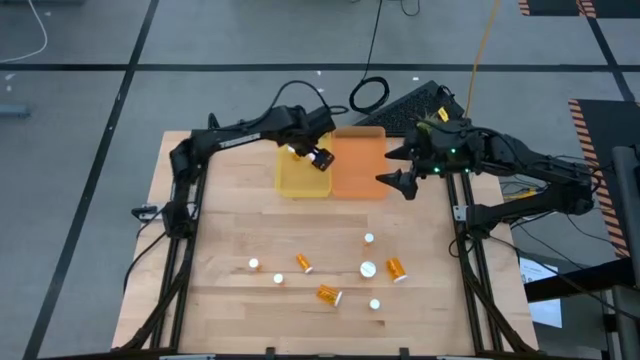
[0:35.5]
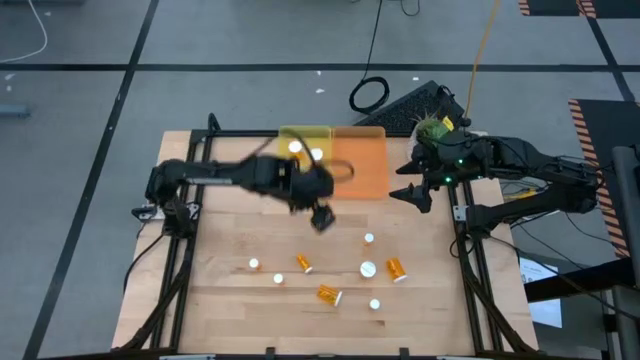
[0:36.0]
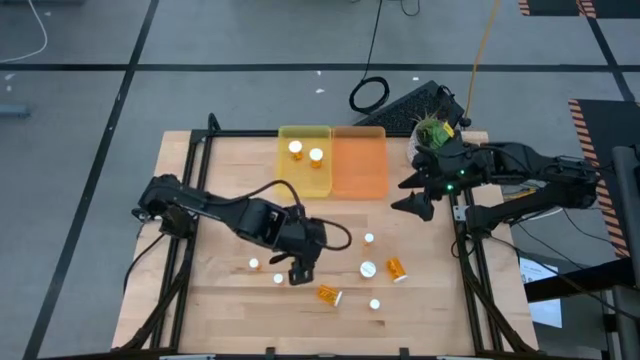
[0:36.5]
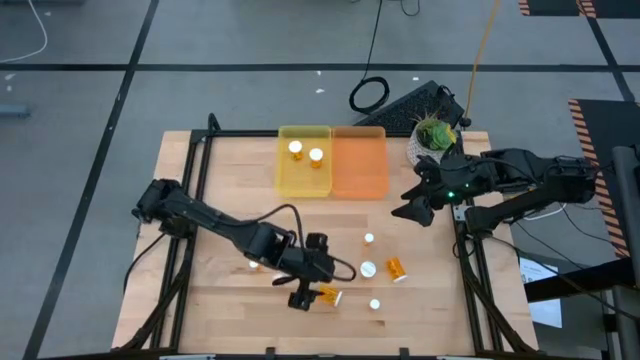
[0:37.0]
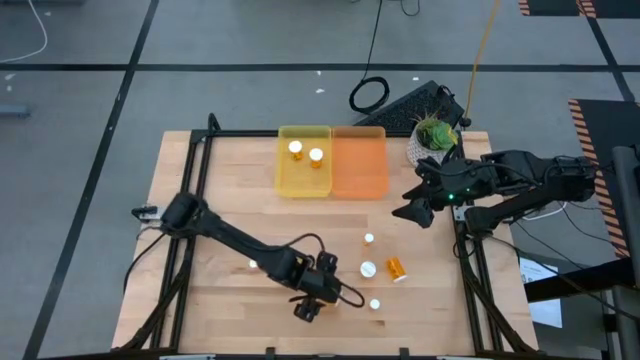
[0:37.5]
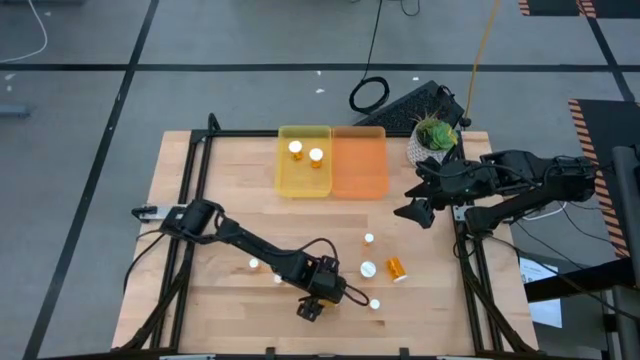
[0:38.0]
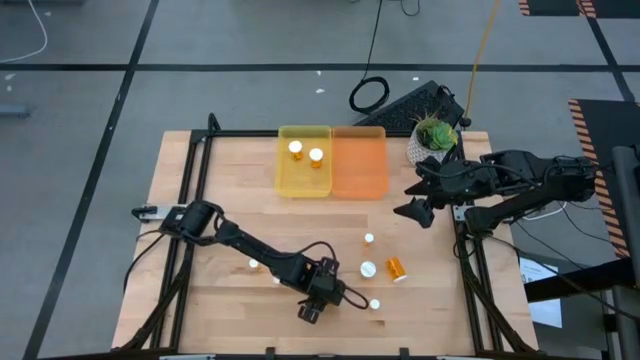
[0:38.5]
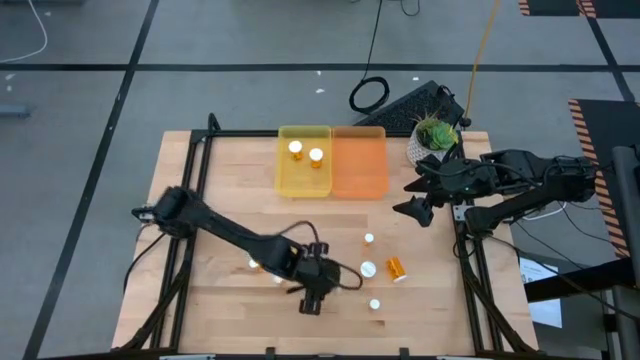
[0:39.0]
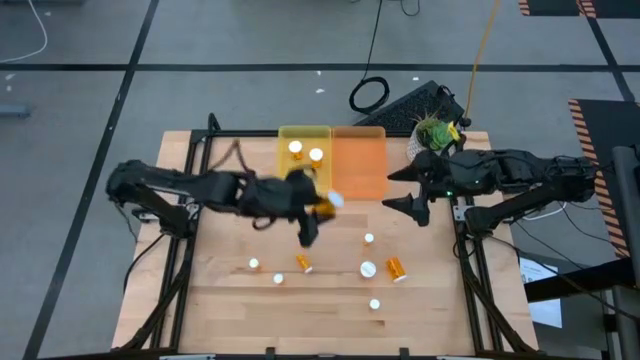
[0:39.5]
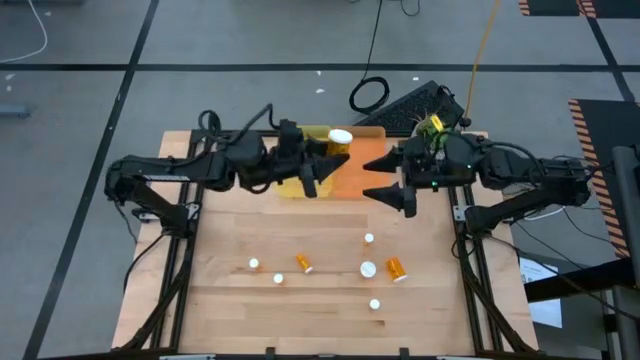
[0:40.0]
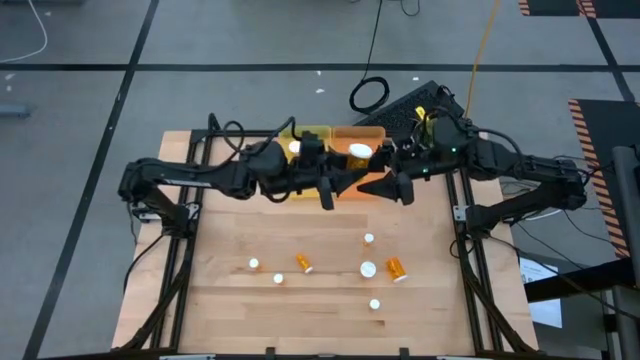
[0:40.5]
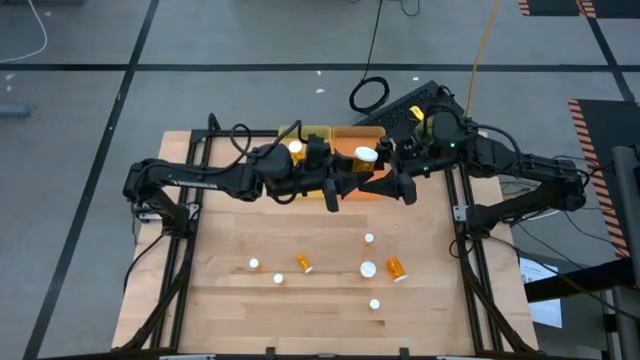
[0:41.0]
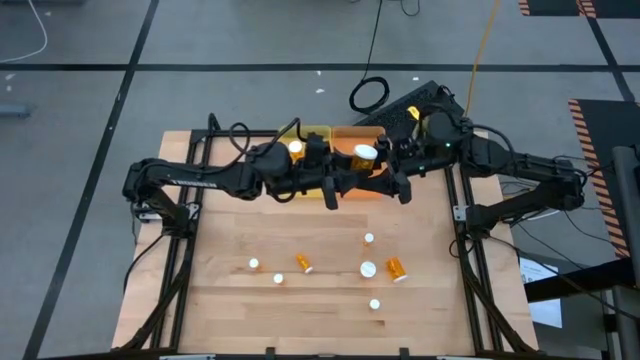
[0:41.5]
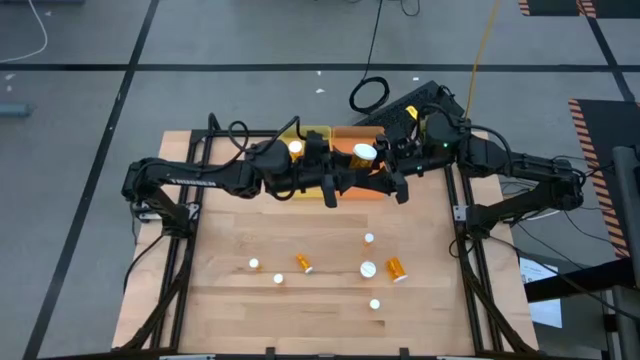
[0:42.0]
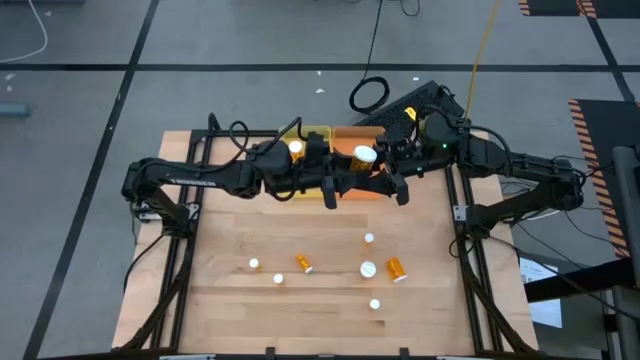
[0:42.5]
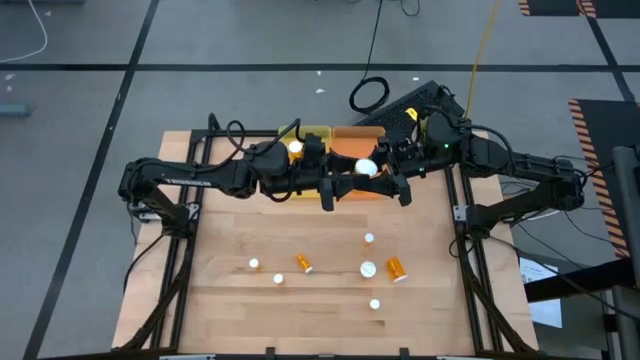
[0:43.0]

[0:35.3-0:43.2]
Task: Pick and place medicine bottles into bin by pill shape (circle, oval)
Put the large orange capsule bottle into the yellow bin

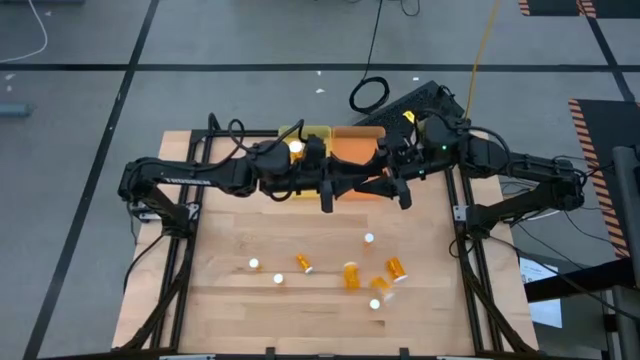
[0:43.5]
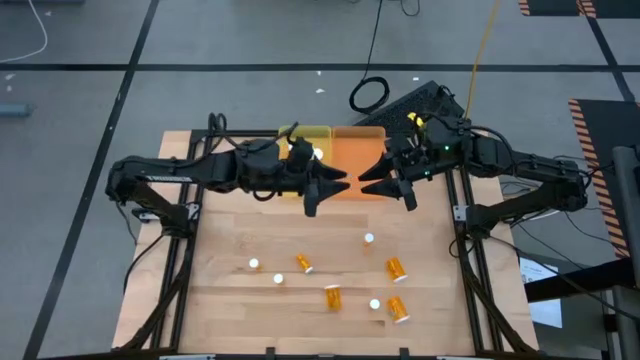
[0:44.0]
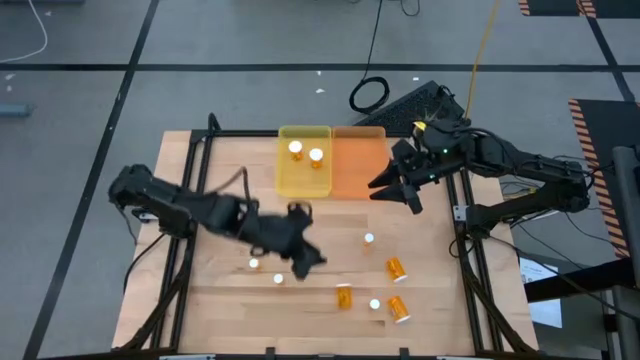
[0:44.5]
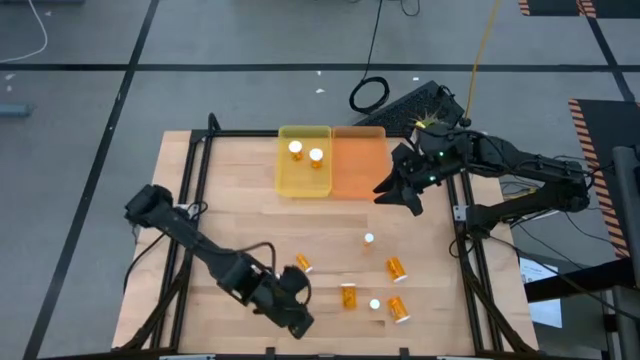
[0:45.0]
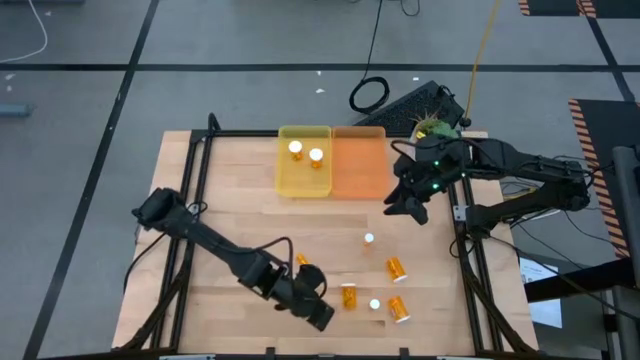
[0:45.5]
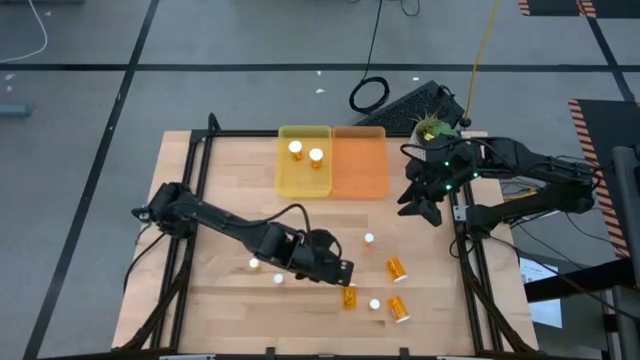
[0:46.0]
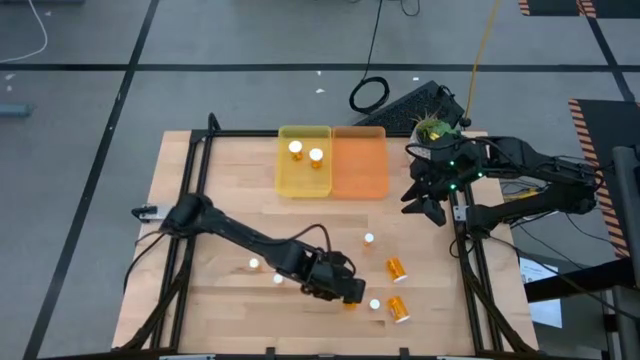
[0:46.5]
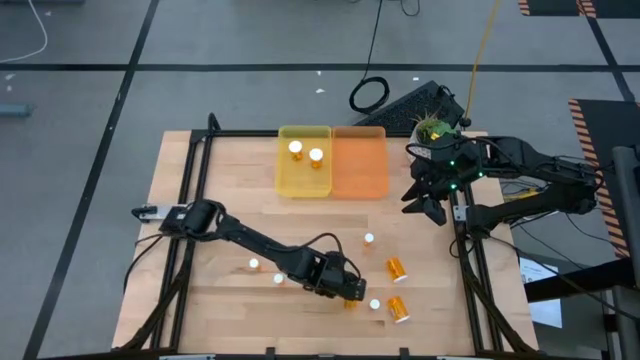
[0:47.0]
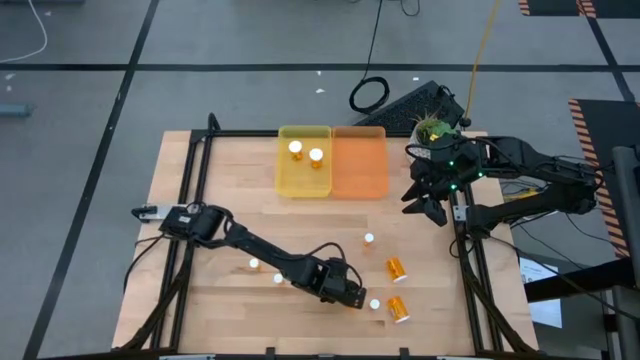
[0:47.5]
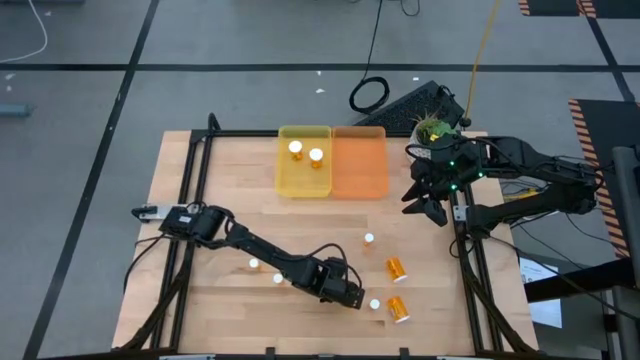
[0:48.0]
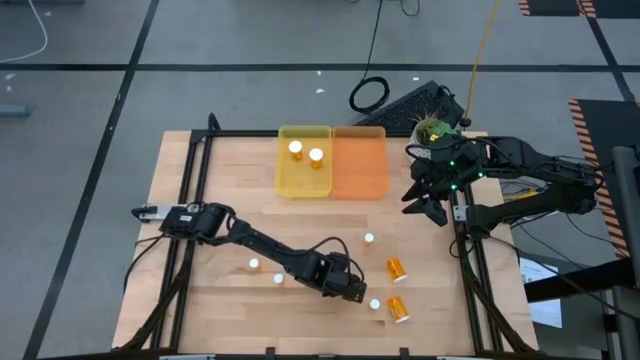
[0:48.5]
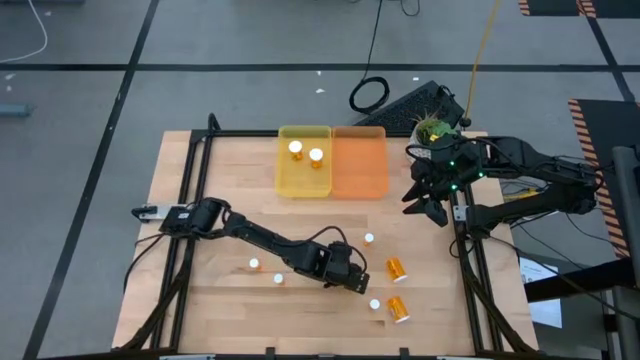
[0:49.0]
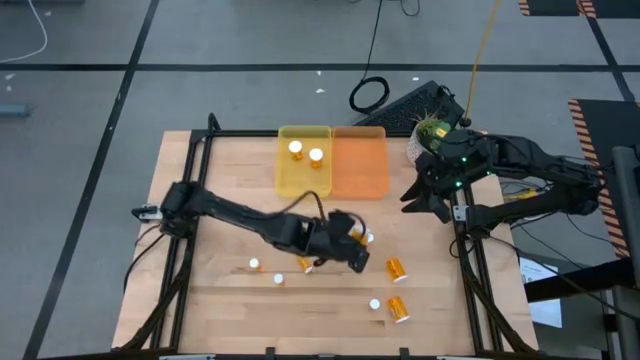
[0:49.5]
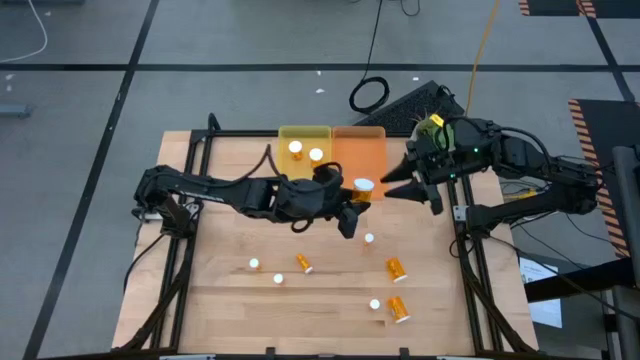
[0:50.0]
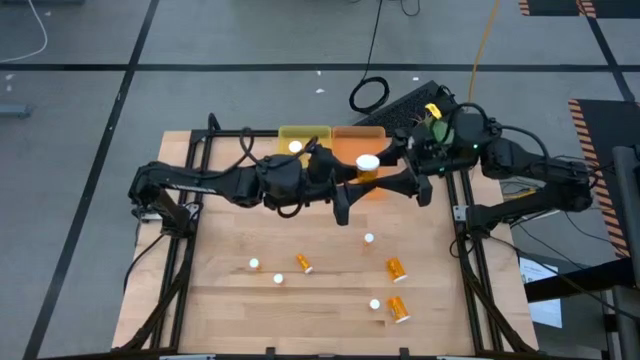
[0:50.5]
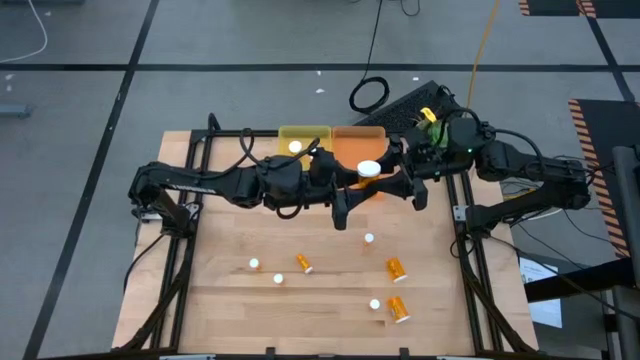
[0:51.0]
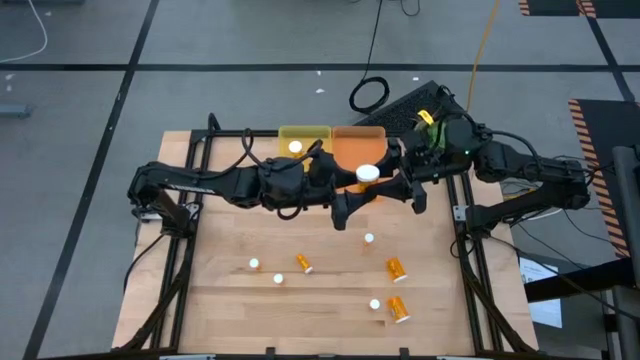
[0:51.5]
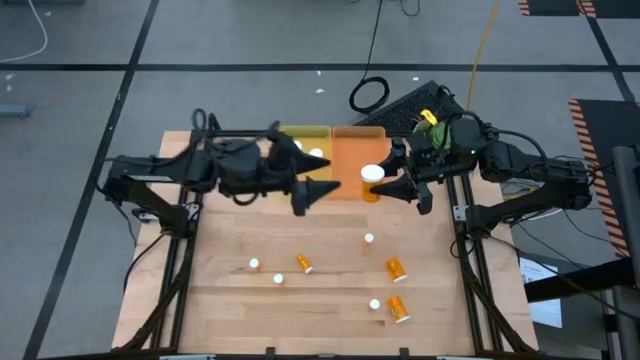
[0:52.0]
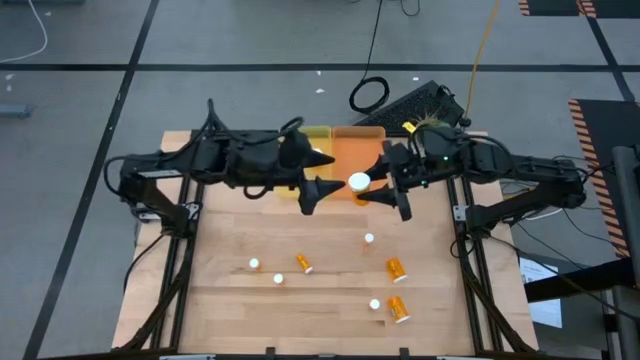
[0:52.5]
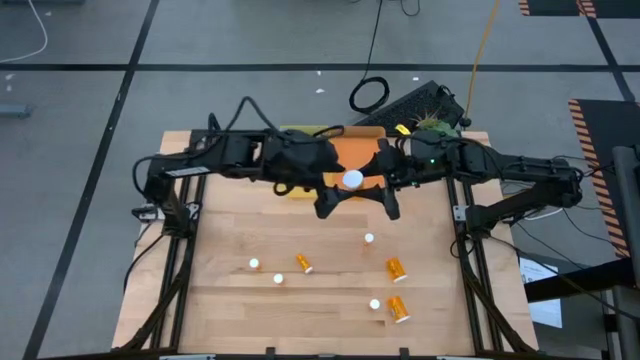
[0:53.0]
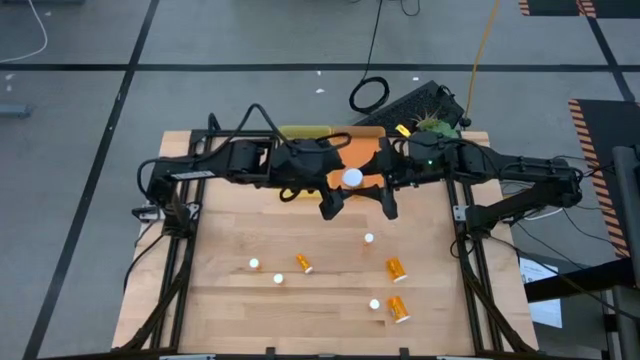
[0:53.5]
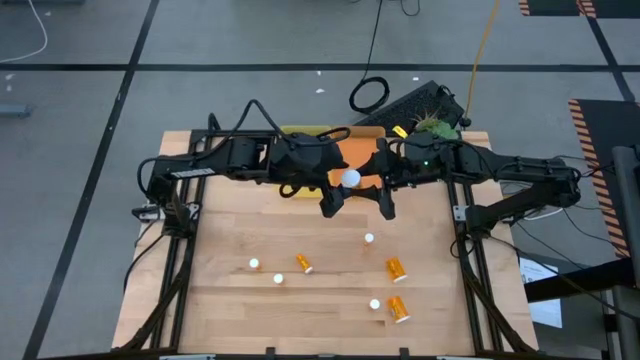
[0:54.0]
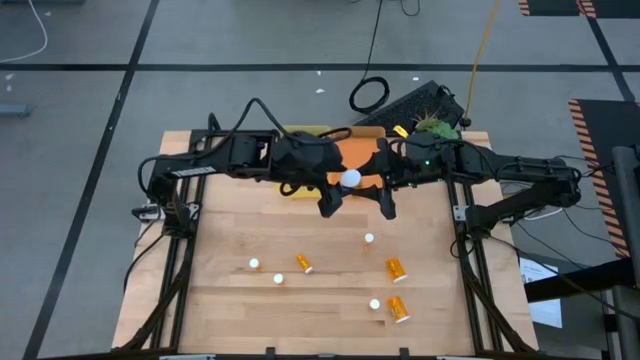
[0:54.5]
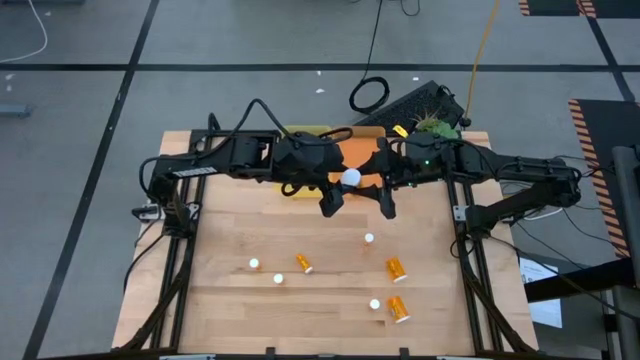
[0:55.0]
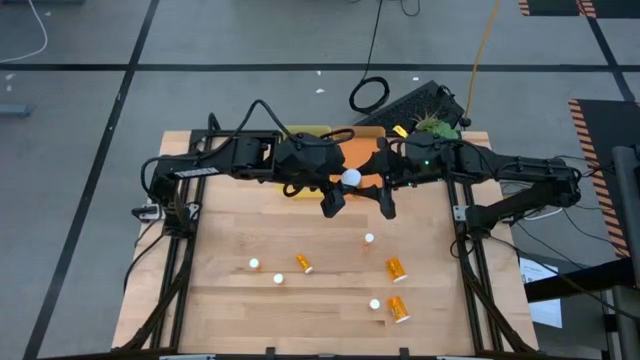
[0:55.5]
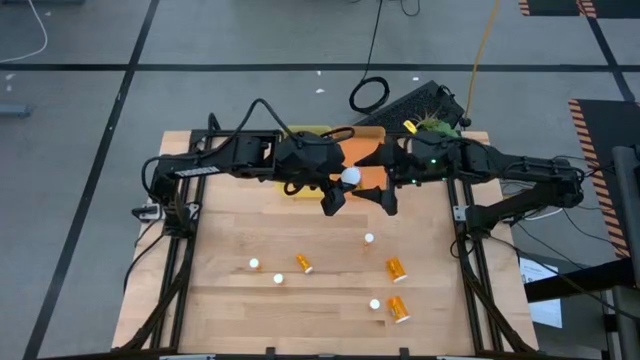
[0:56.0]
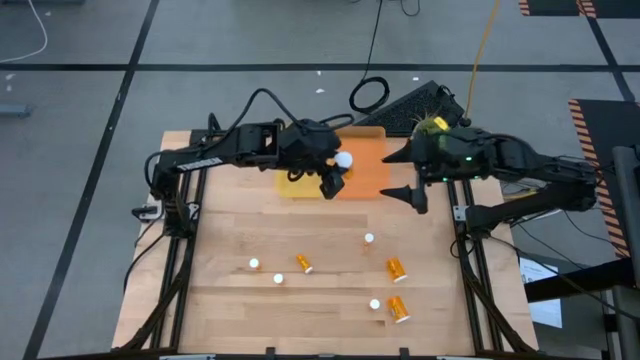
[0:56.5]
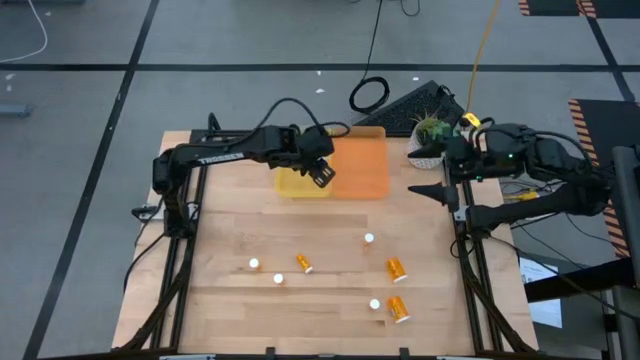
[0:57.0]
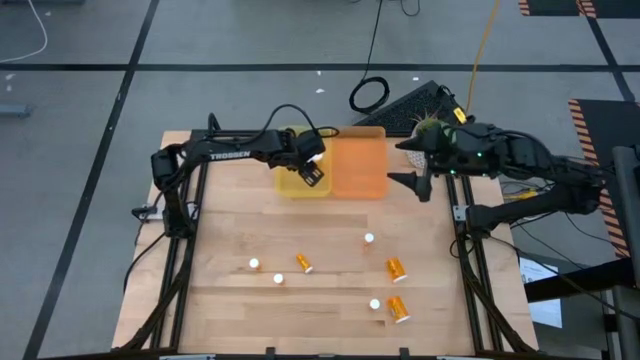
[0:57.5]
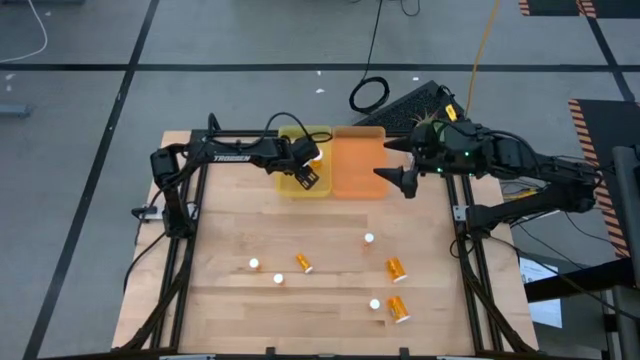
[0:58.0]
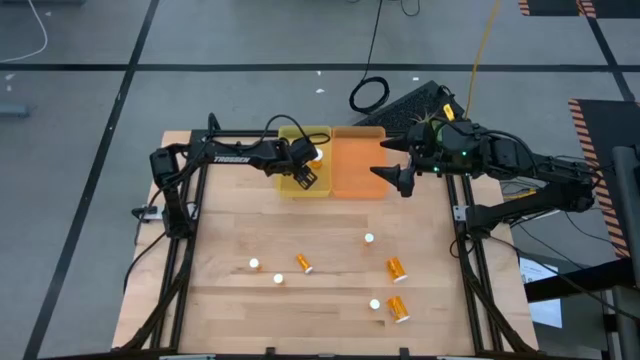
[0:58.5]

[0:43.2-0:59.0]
Put the large orange capsule bottle into the yellow bin
